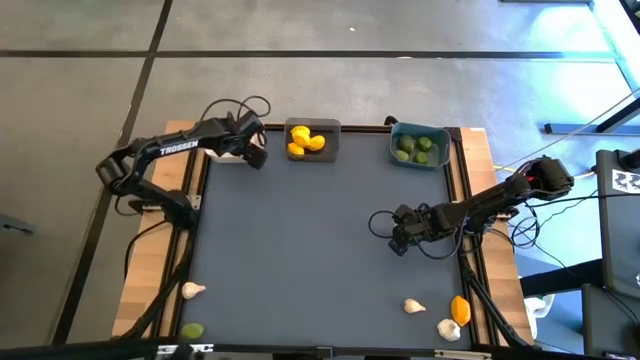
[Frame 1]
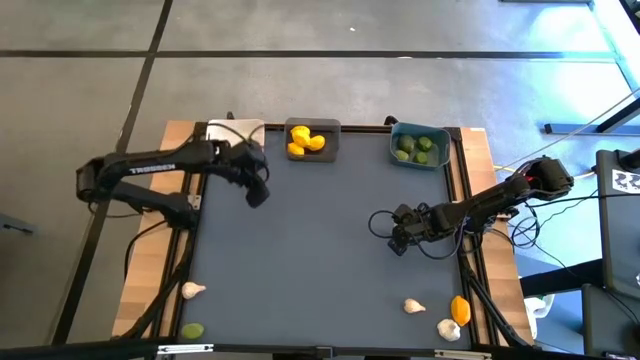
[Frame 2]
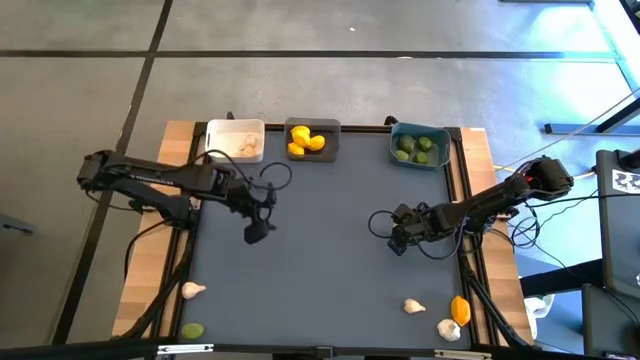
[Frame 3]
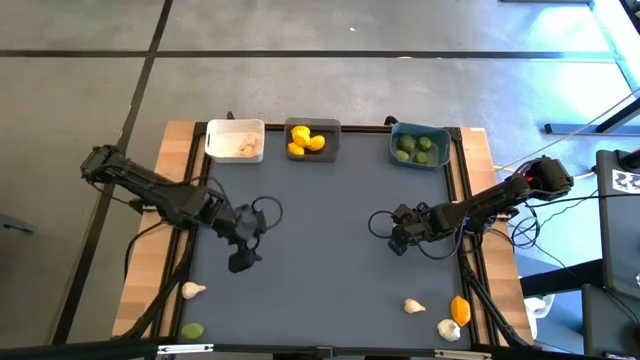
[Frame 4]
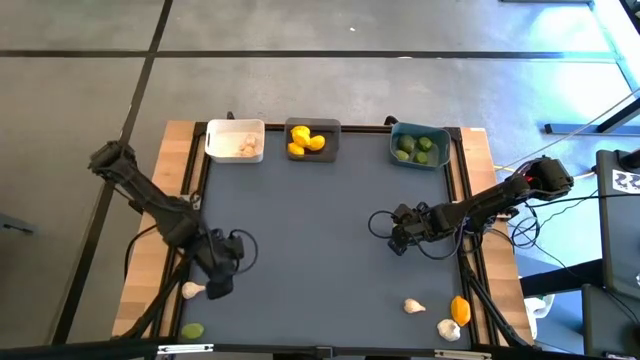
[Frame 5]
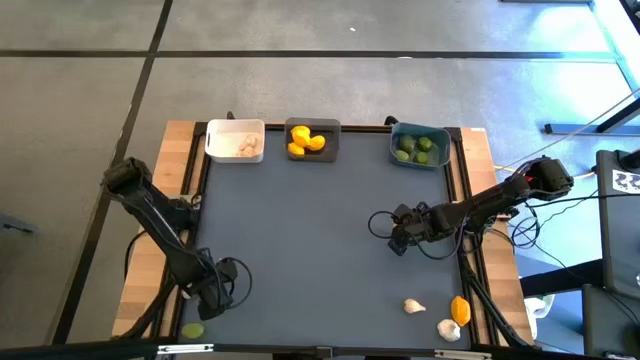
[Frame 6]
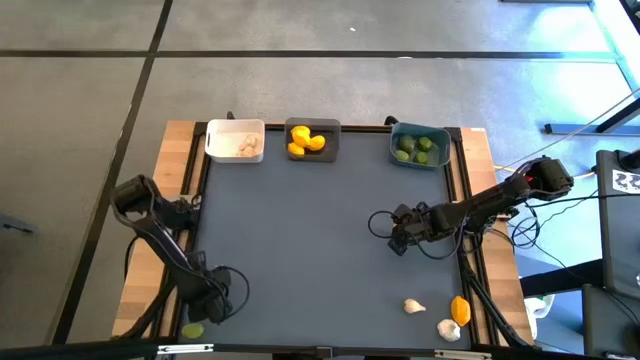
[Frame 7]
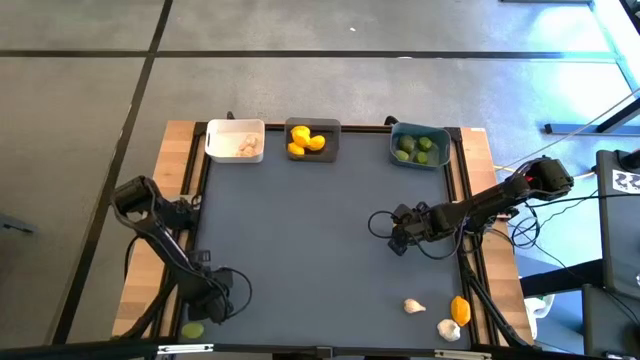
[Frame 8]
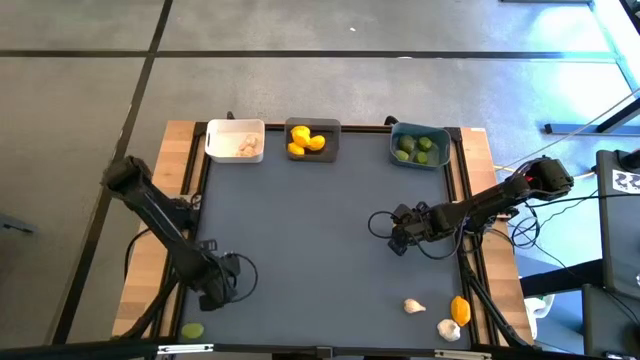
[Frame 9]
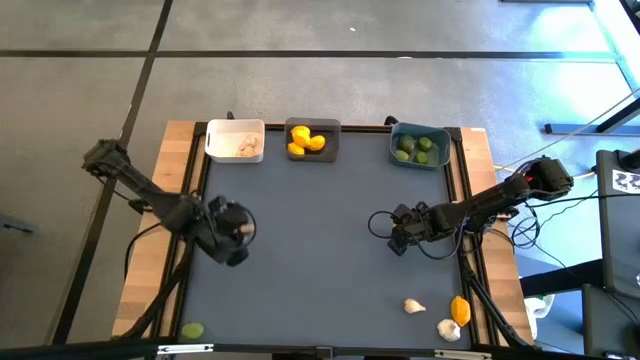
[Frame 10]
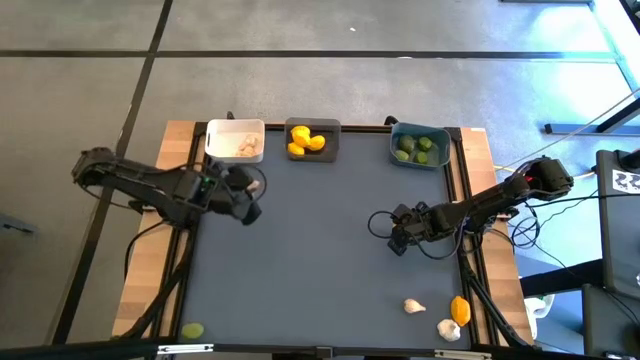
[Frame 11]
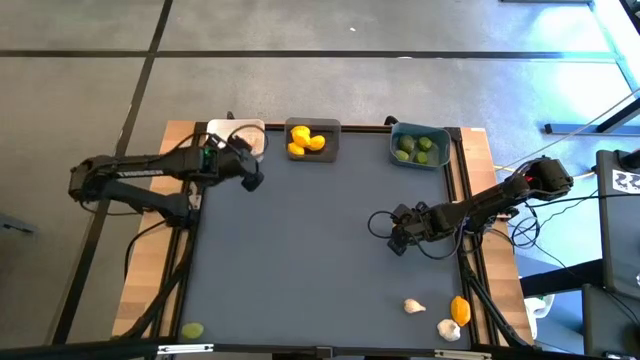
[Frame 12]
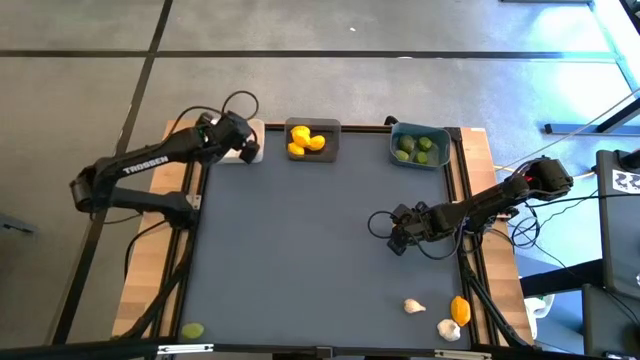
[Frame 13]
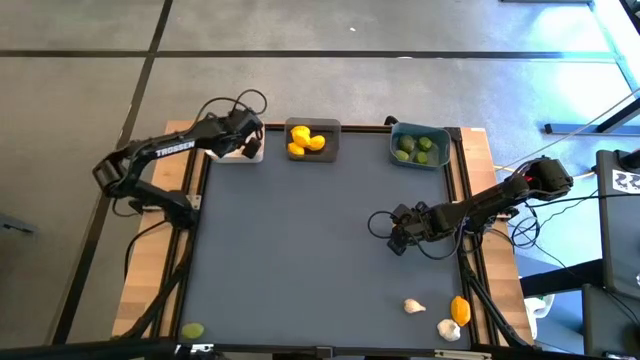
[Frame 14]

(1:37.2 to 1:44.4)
Task: Sort produce into baskets
Put the garlic into the white bin

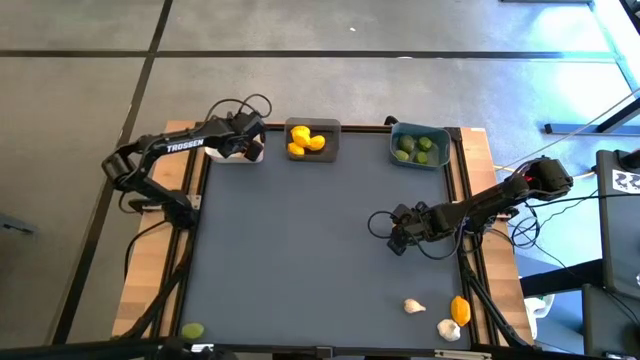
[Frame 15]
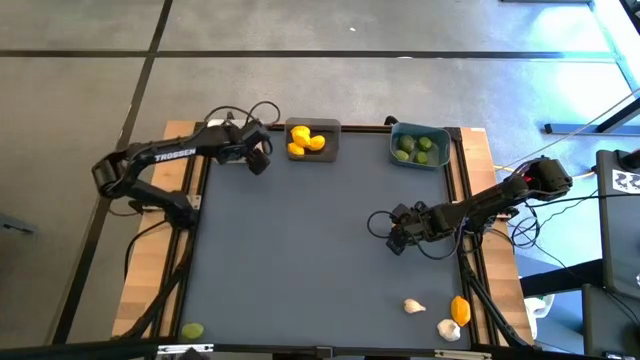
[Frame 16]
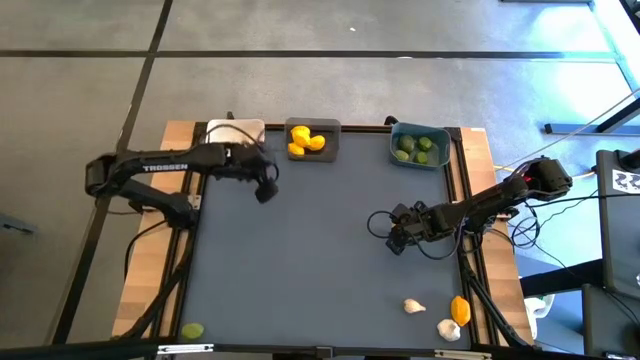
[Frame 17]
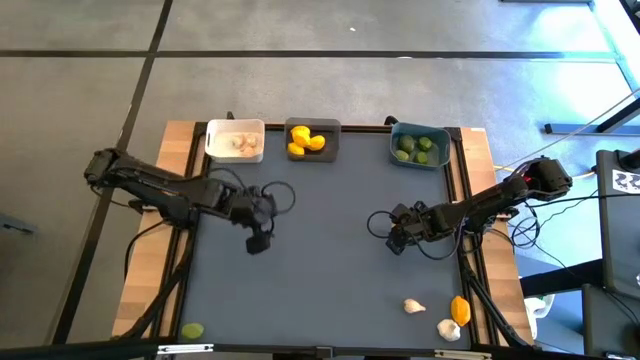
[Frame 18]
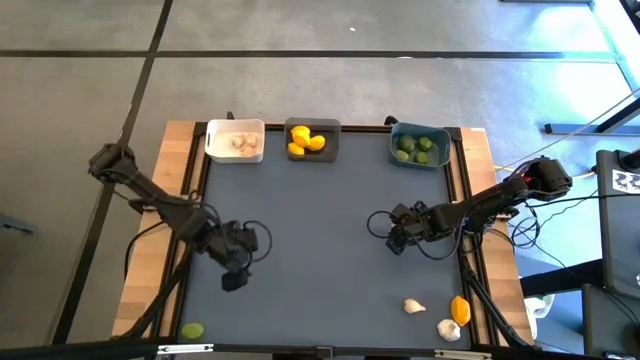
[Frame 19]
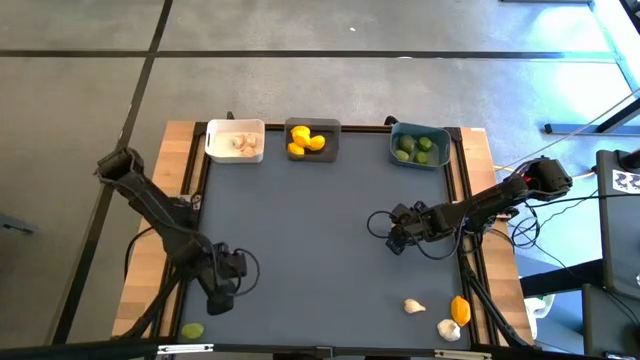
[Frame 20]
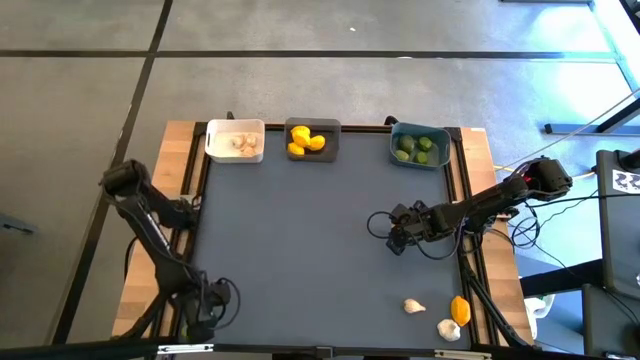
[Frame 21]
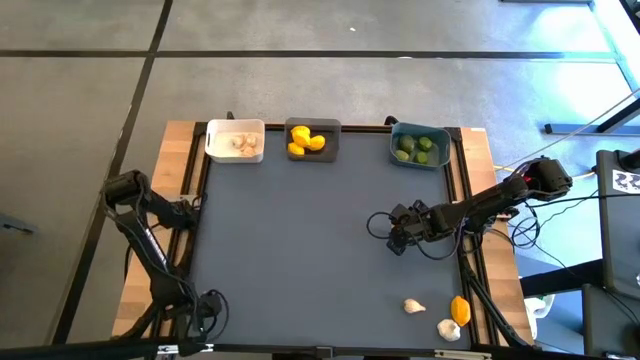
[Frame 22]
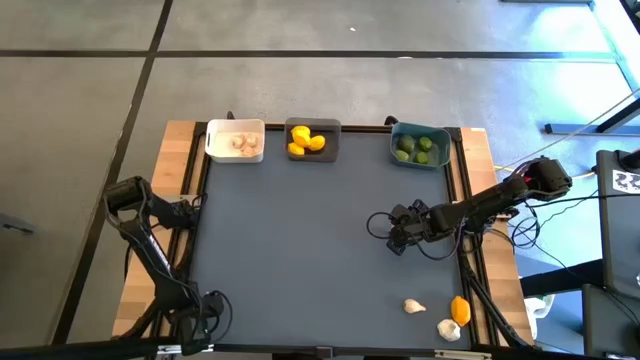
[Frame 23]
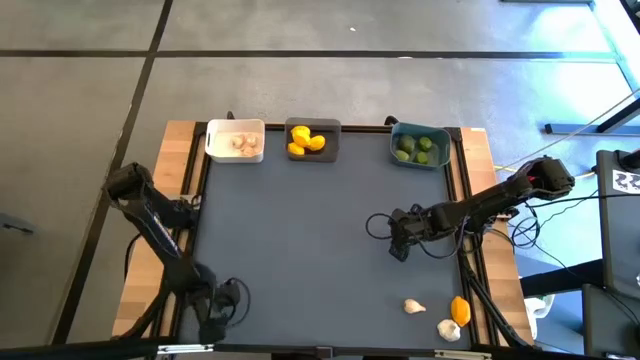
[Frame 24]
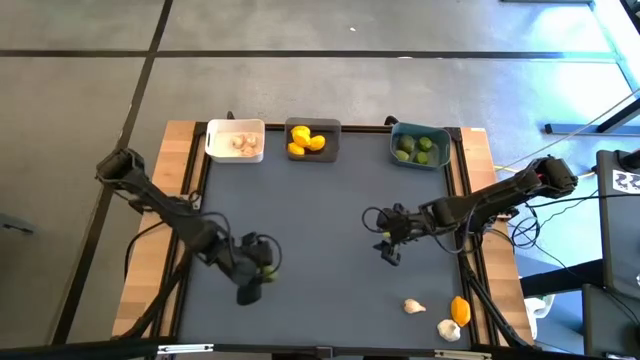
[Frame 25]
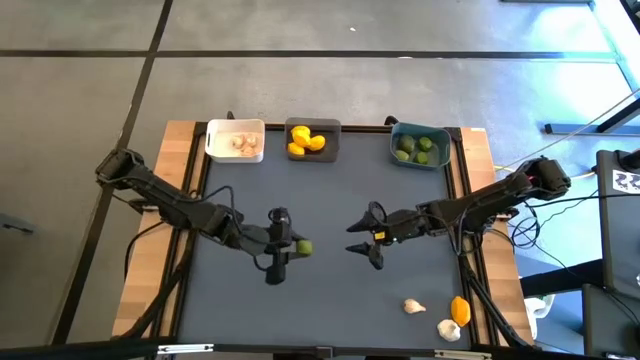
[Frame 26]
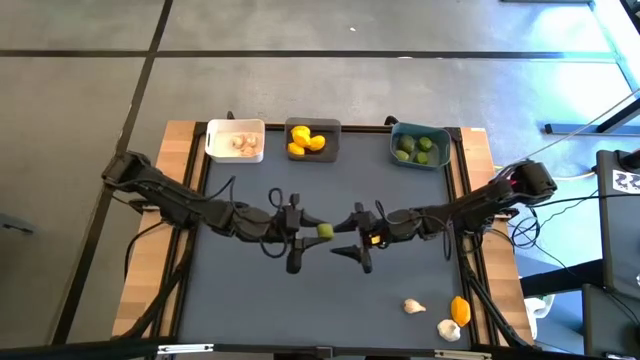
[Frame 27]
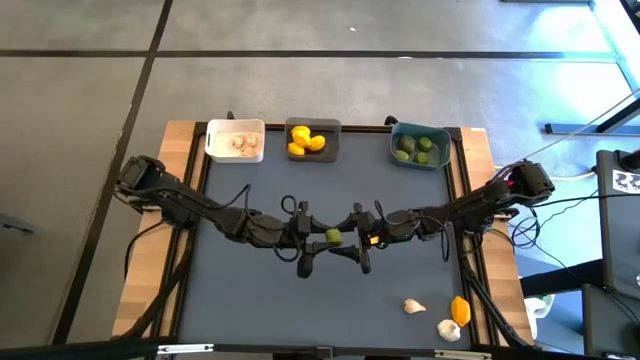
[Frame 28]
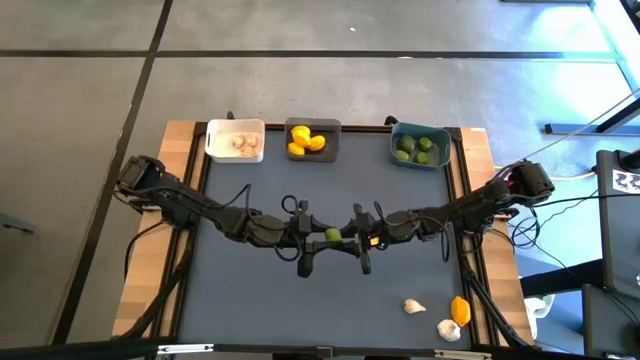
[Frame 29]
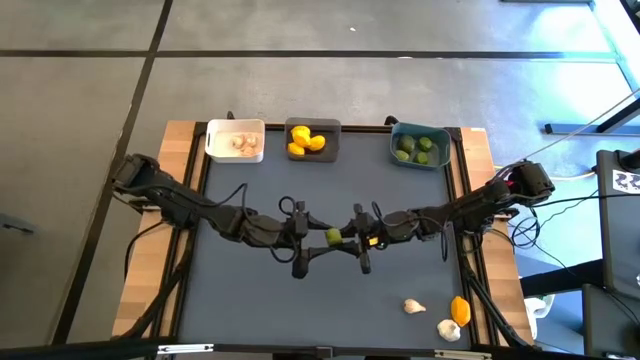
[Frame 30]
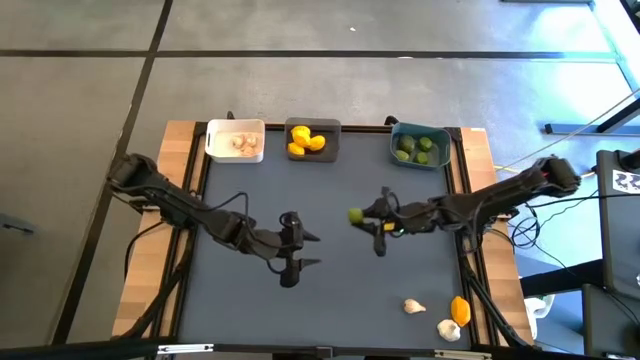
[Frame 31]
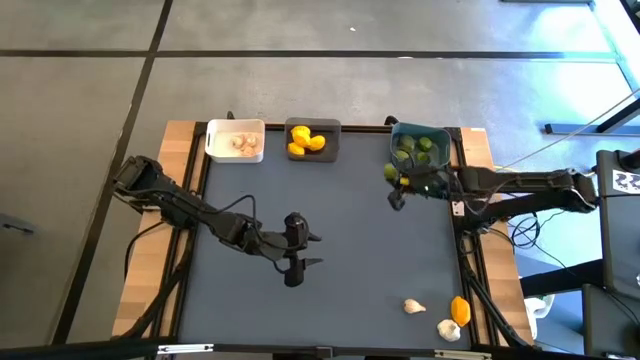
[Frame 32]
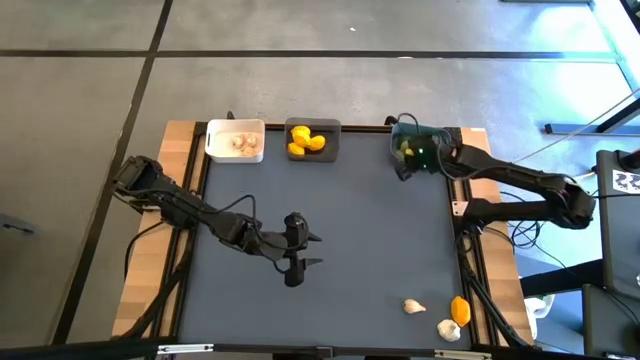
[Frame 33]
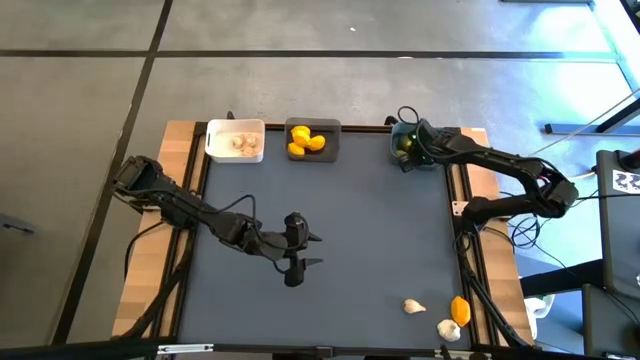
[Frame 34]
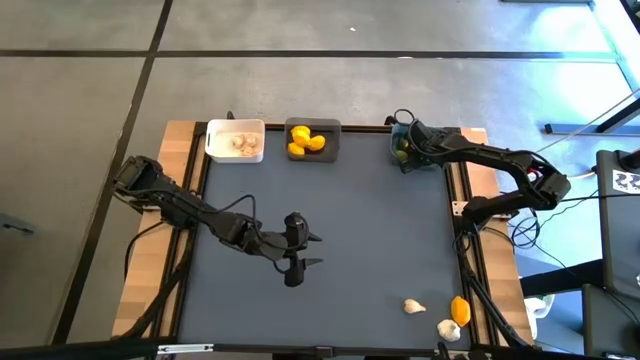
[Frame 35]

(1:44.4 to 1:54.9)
Put the lime into the blue bin
